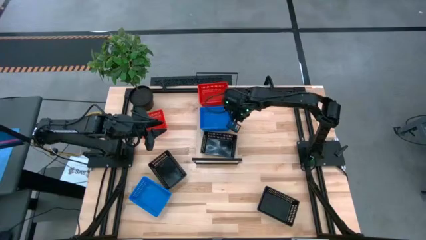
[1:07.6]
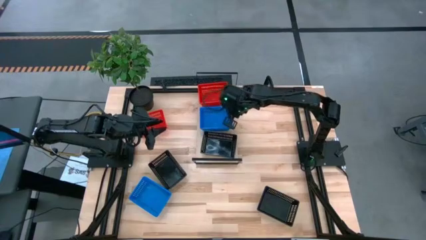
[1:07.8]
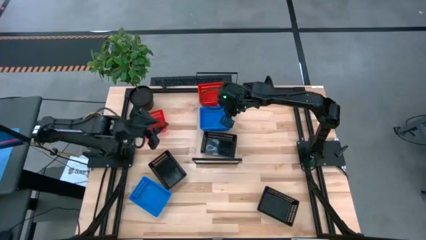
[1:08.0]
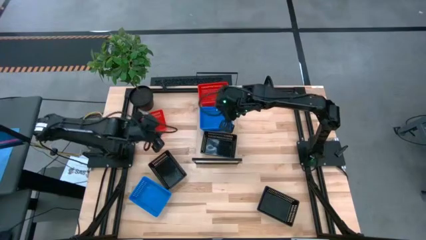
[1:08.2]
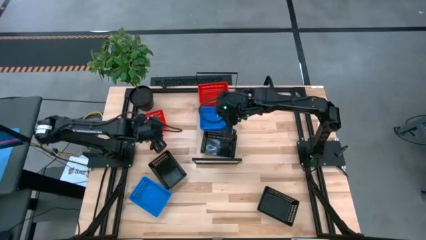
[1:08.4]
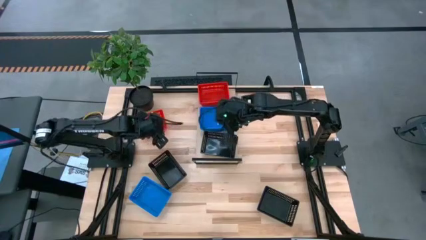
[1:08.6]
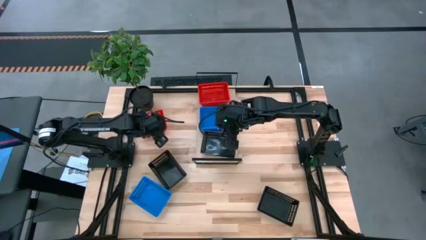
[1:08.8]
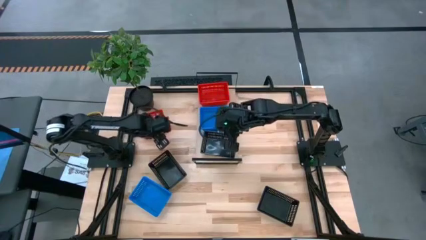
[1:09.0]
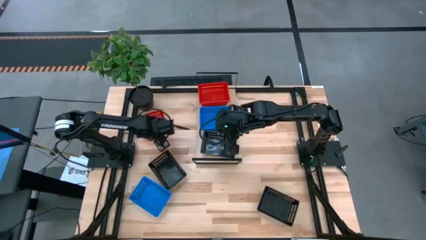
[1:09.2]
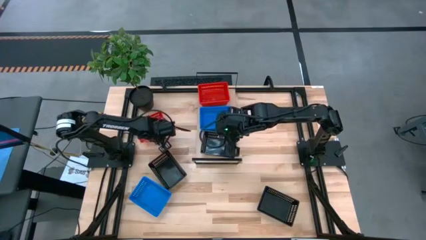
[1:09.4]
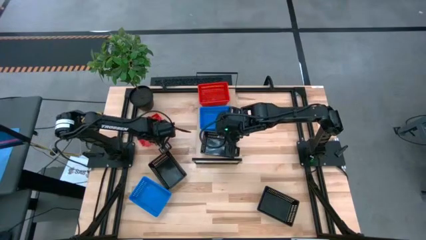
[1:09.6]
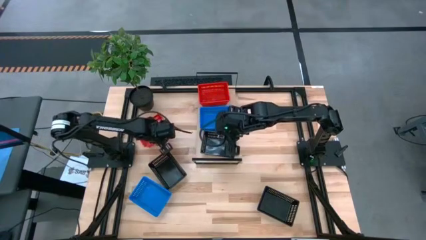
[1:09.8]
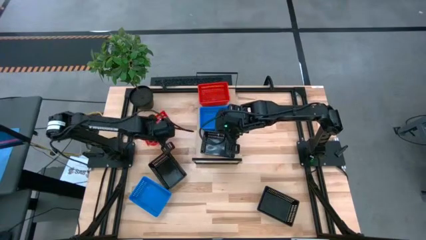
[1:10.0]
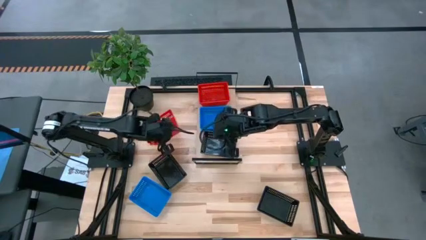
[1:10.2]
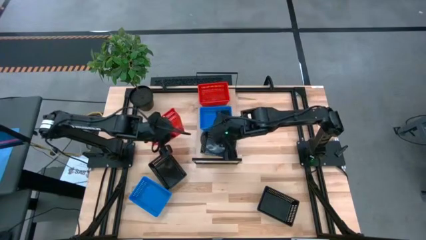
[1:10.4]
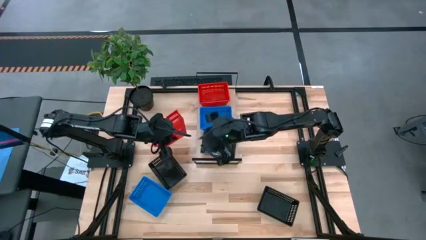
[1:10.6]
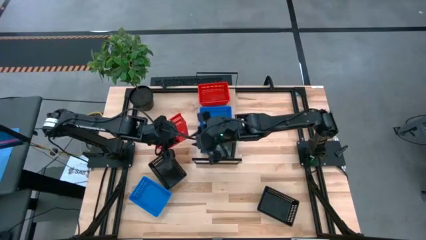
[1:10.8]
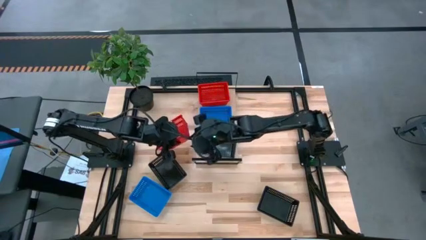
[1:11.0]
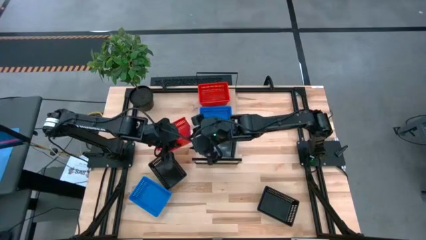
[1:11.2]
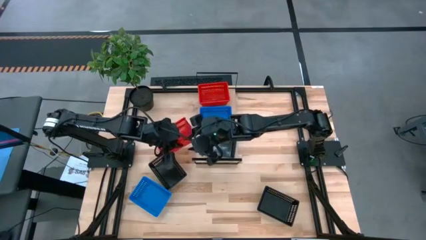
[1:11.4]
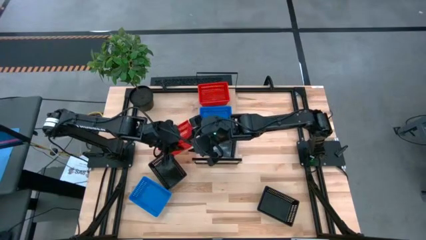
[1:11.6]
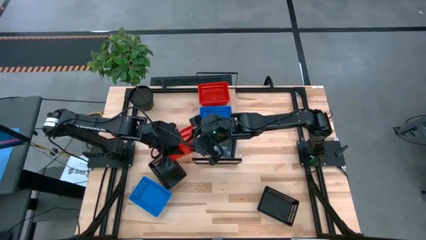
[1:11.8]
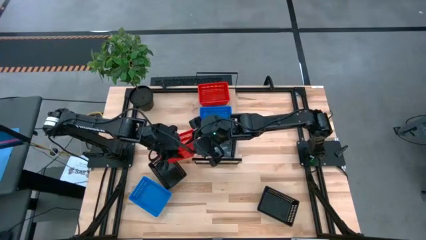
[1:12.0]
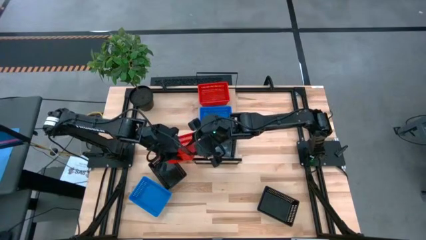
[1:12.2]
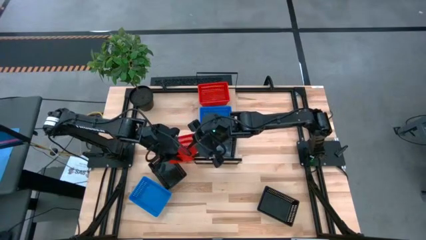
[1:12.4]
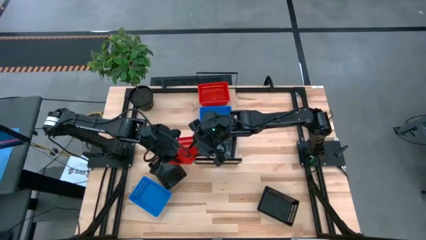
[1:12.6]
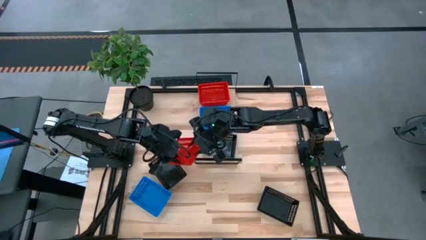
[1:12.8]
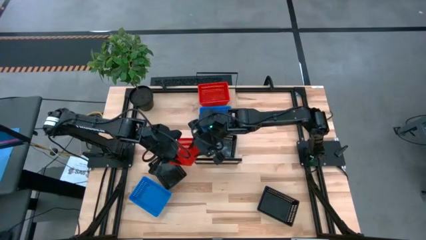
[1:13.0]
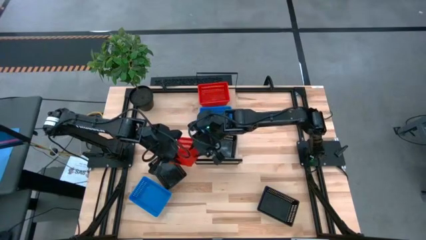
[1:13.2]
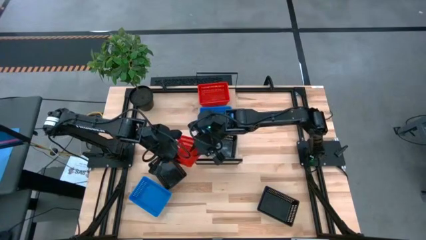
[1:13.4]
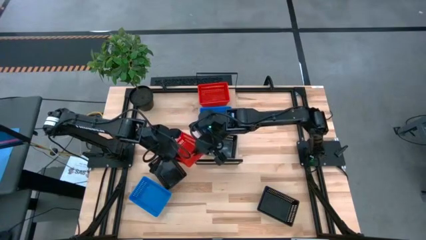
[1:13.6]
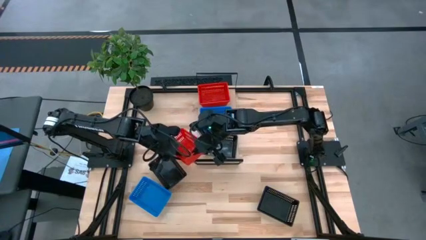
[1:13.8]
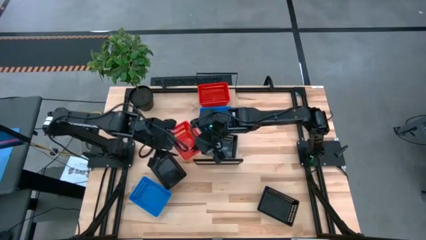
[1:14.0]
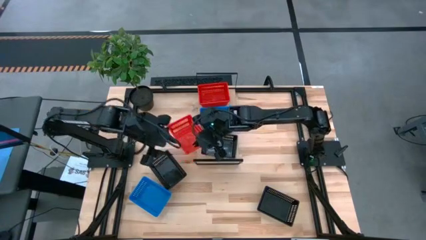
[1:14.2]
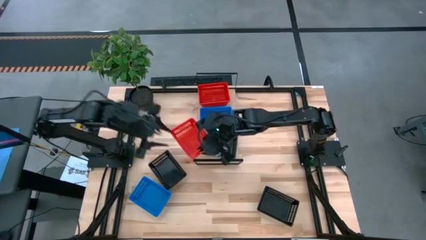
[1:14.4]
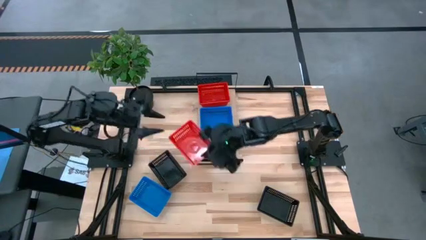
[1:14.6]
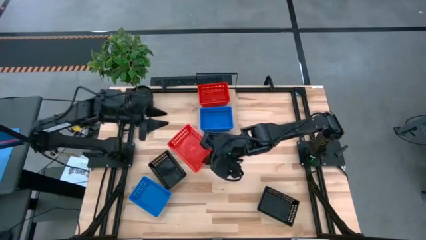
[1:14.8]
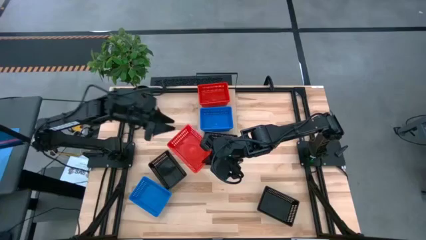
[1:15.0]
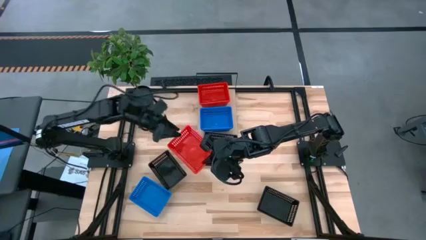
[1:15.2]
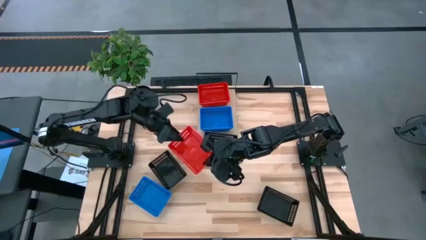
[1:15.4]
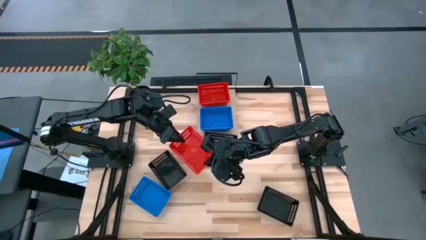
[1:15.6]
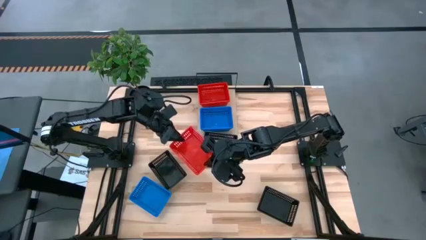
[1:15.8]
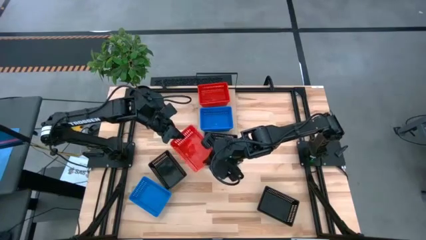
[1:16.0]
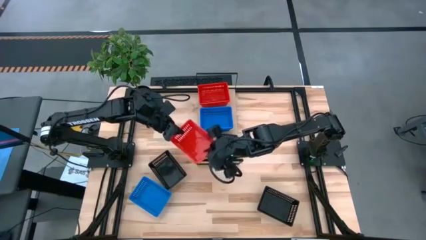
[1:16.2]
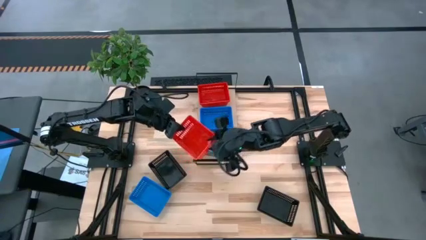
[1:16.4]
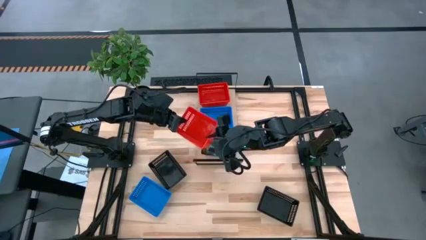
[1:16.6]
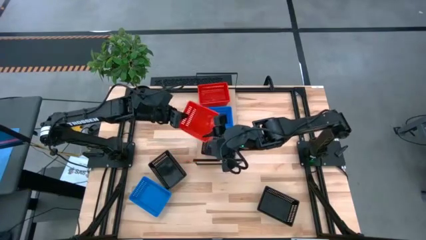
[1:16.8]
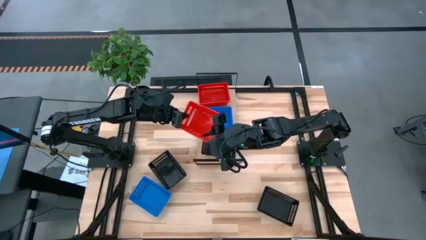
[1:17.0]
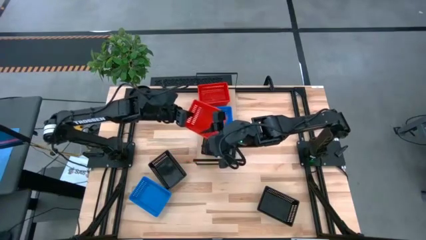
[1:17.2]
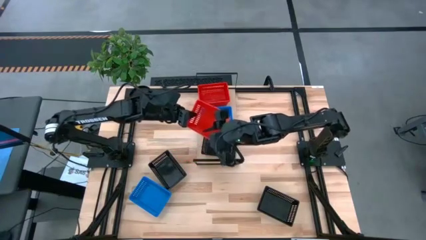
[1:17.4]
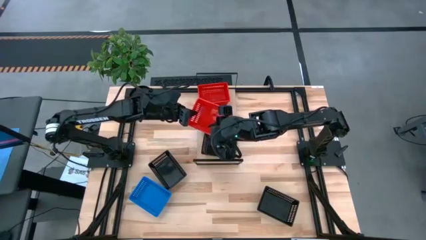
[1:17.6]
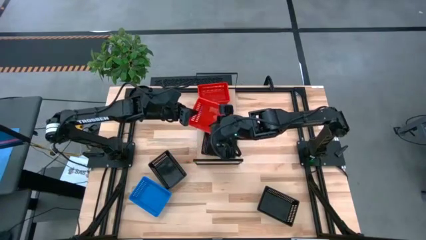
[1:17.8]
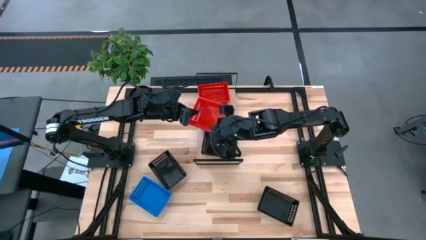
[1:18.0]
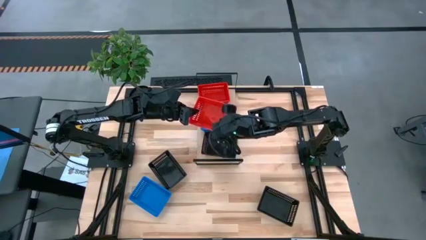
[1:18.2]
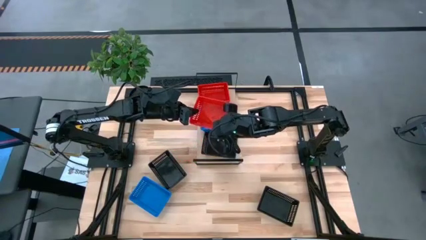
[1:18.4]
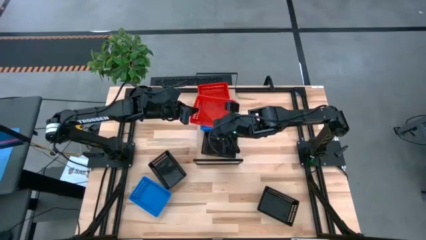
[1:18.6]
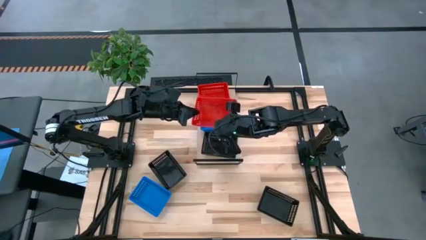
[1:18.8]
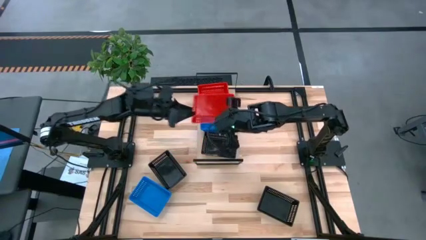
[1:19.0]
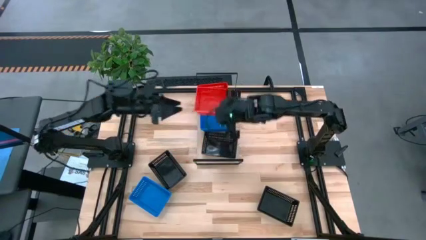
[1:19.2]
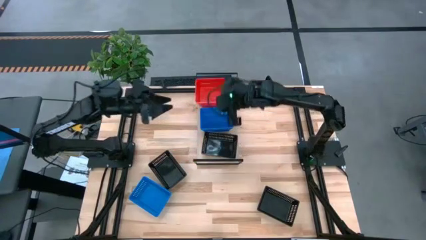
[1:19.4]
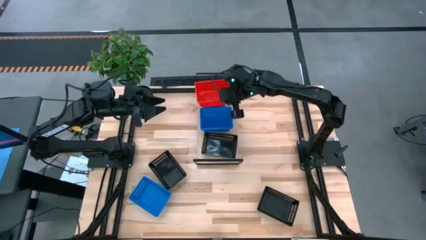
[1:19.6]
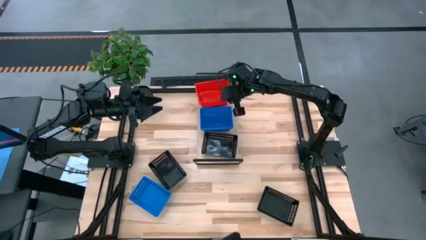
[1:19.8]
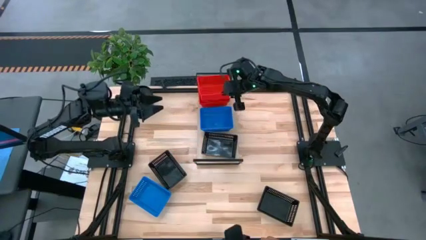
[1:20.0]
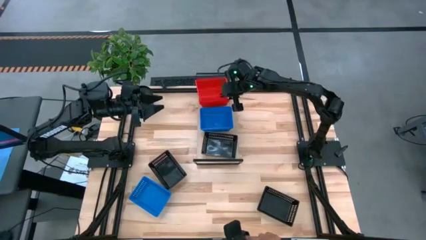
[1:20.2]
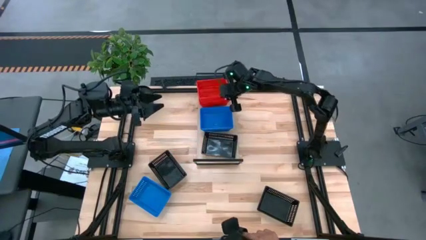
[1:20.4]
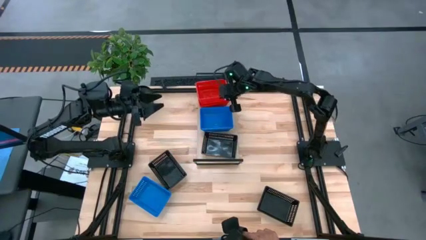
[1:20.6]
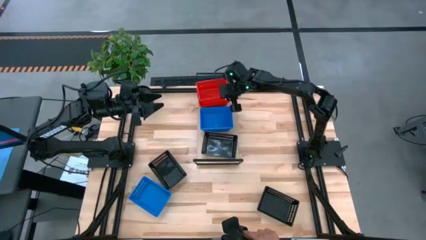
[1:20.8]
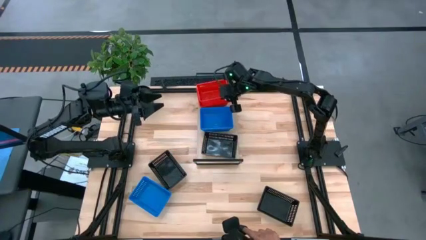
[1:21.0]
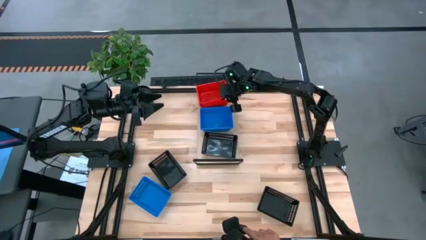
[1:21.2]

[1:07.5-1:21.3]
Task: Stack baskets on shelf by color
Stack the red bin on the red bin on the shelf
